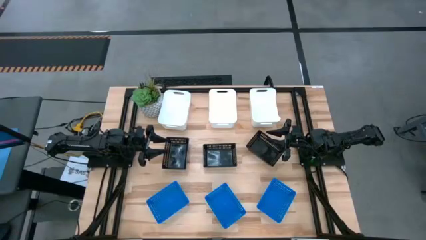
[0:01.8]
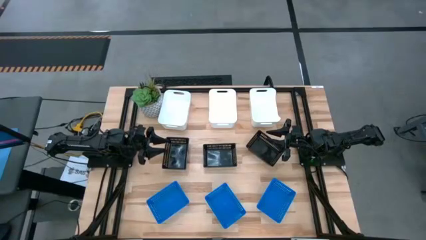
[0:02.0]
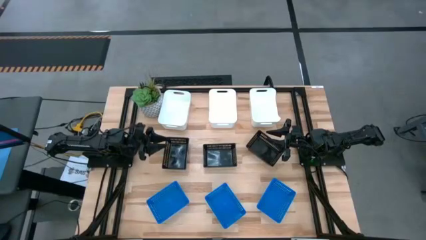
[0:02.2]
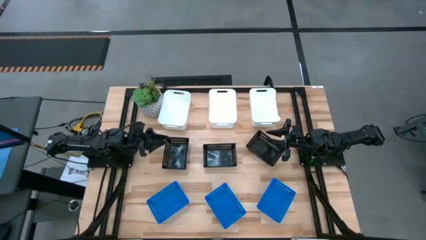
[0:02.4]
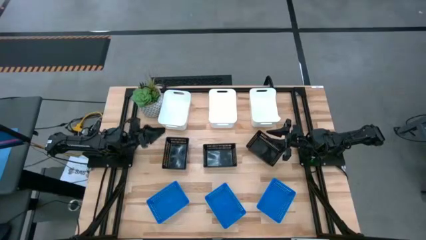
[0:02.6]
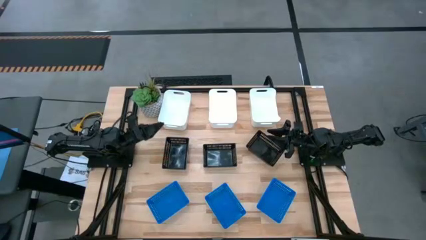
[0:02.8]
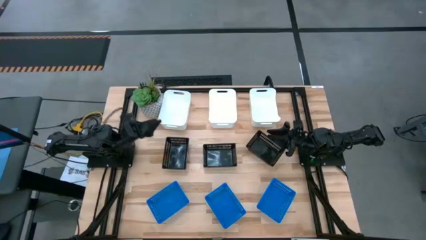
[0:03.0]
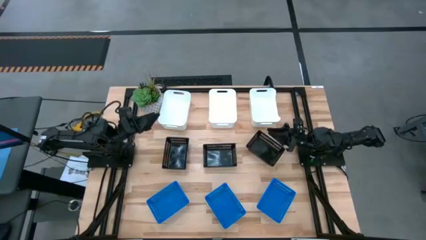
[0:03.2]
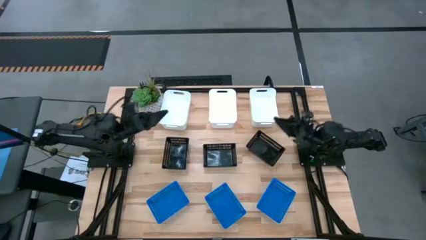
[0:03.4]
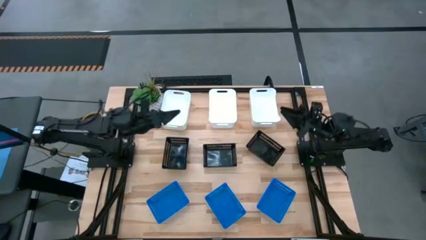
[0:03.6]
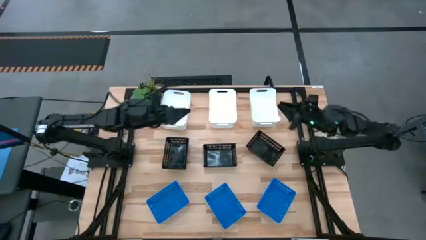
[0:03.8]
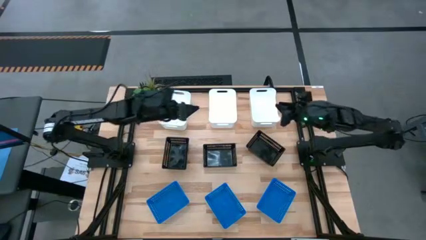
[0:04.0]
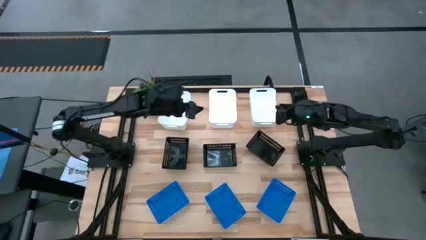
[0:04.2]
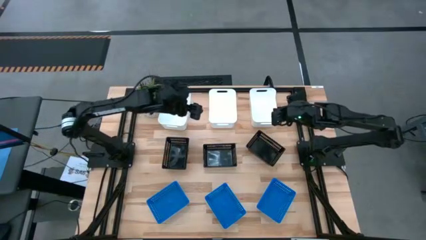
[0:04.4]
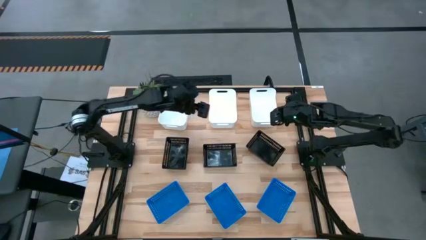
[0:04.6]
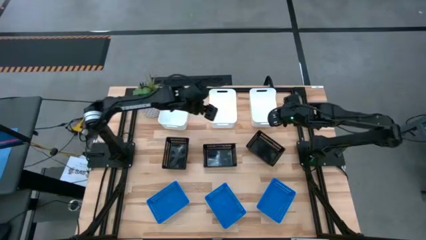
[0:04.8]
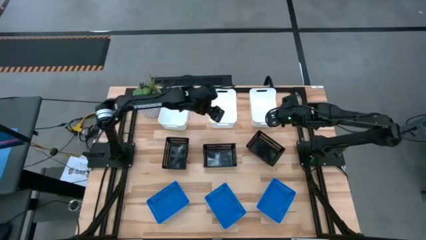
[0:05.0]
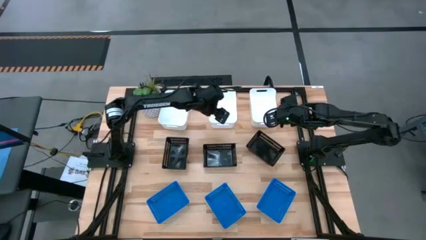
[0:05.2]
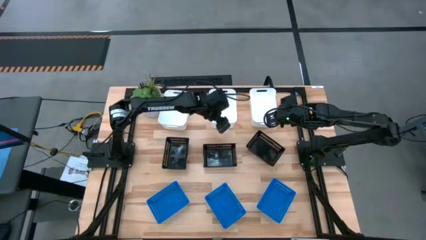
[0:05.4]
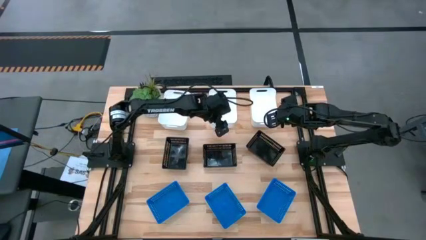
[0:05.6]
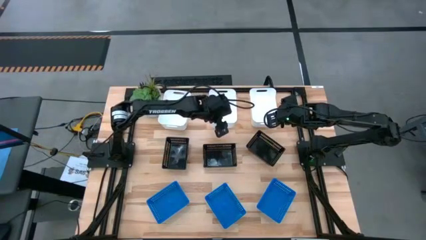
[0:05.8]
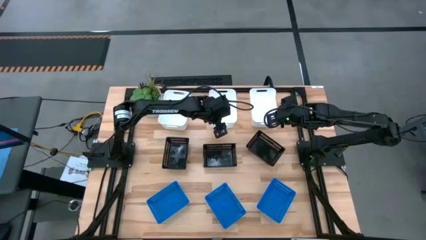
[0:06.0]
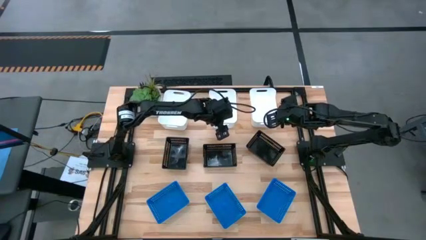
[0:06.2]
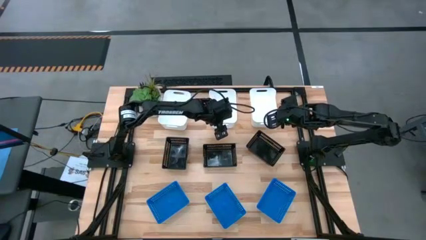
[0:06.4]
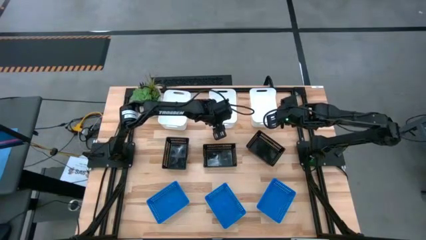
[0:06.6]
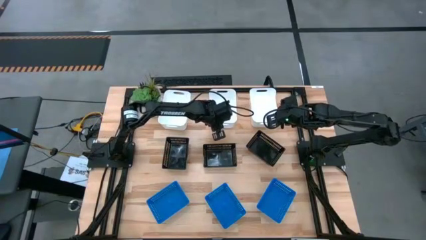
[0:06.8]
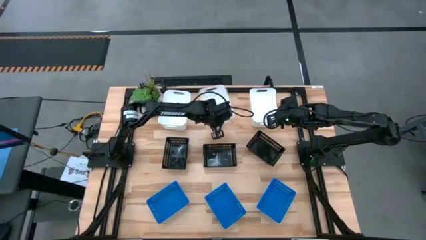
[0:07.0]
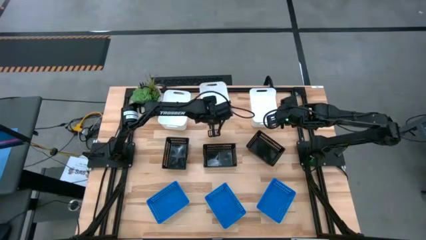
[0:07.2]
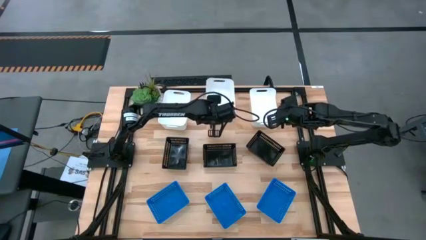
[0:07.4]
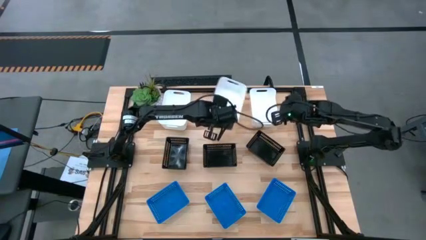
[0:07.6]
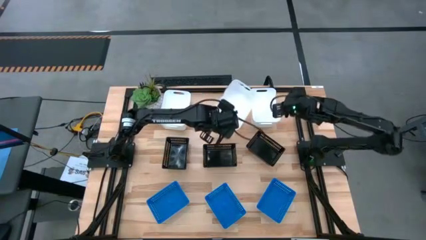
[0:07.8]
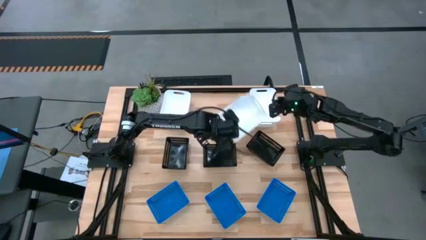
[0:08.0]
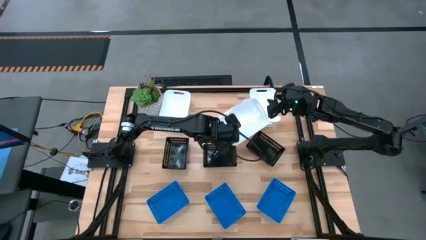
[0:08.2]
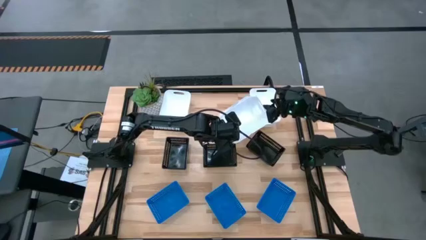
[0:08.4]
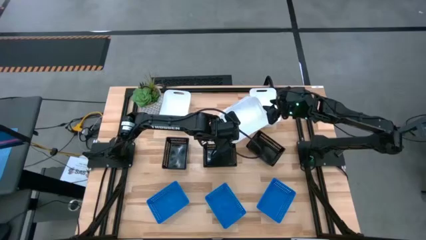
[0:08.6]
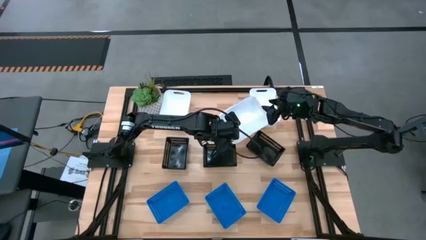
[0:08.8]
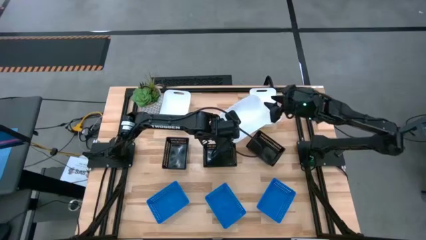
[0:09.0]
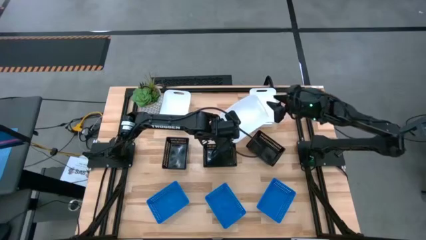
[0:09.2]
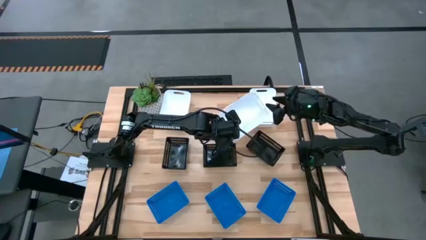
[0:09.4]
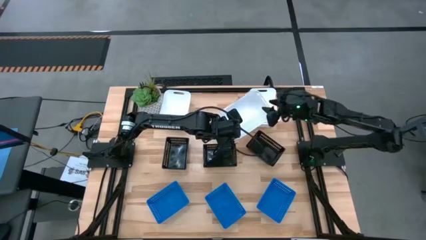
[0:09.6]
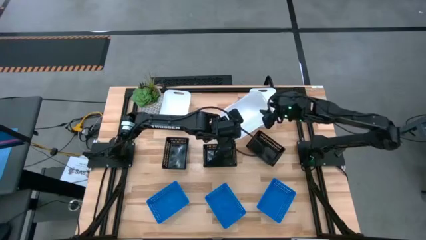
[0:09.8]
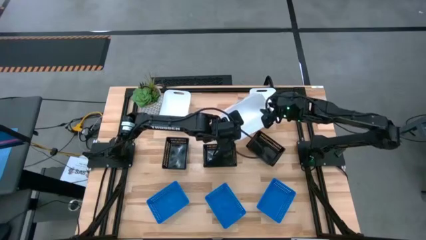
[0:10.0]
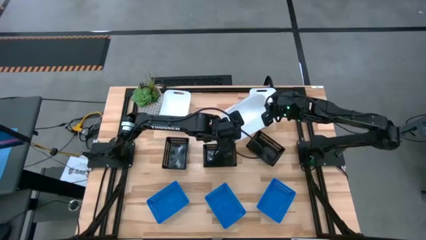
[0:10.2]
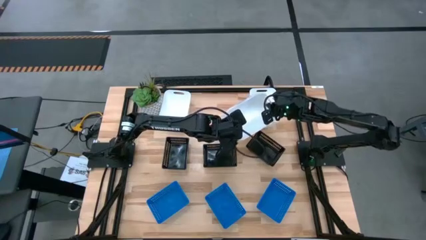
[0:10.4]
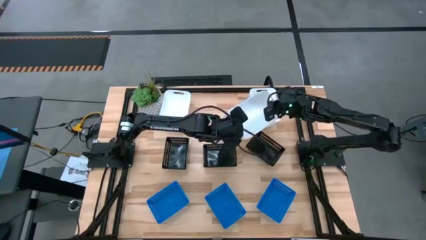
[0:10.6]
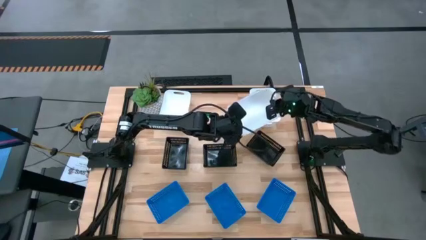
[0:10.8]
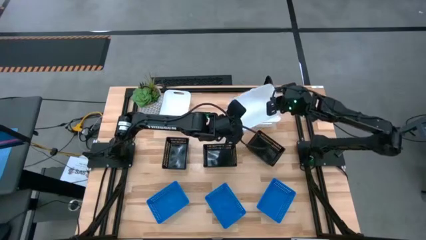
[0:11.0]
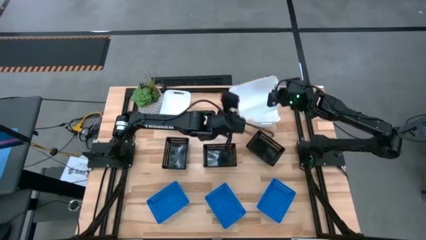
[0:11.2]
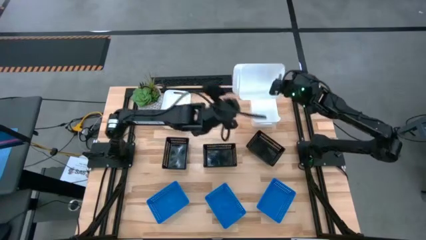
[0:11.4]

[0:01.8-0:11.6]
Stack the middle white bin on the left white bin

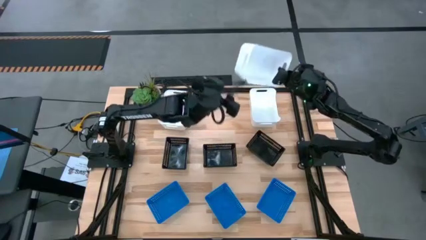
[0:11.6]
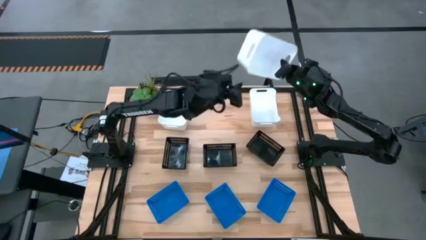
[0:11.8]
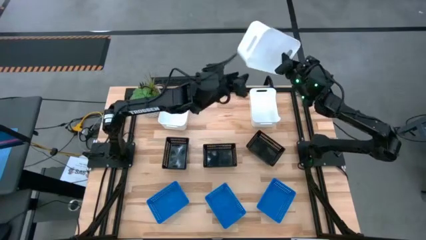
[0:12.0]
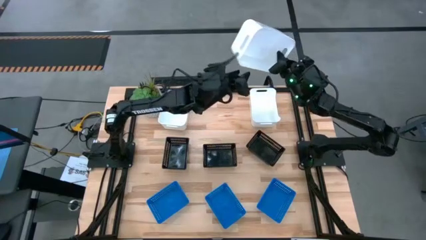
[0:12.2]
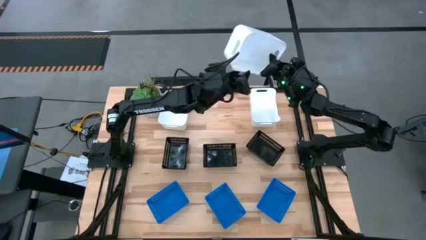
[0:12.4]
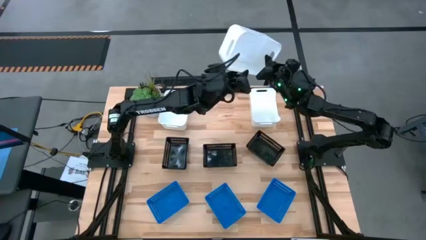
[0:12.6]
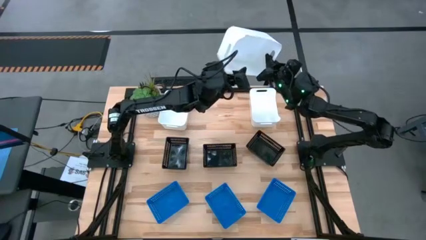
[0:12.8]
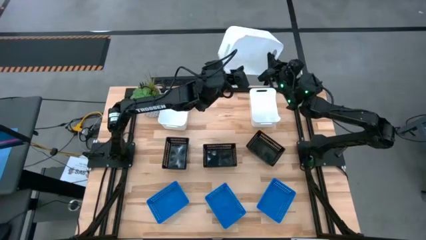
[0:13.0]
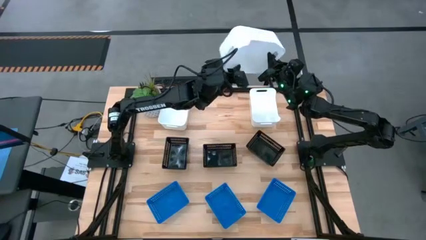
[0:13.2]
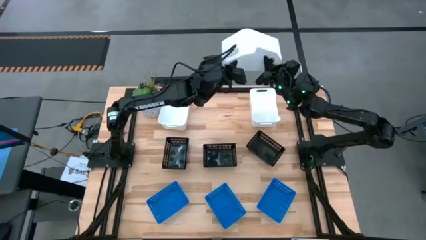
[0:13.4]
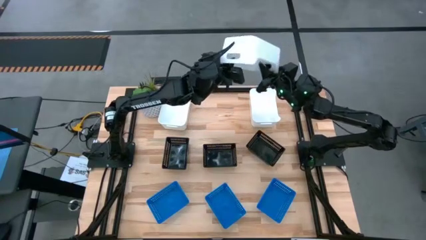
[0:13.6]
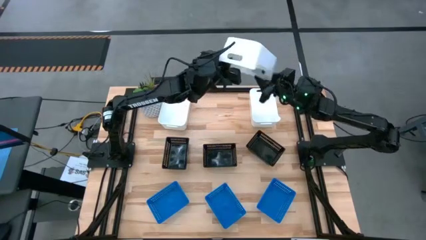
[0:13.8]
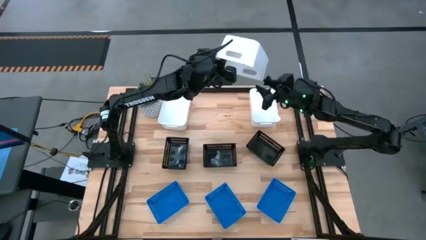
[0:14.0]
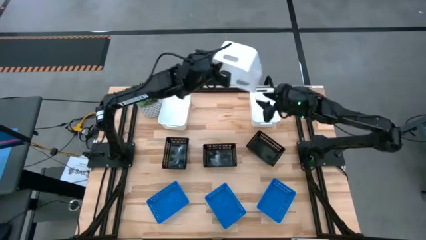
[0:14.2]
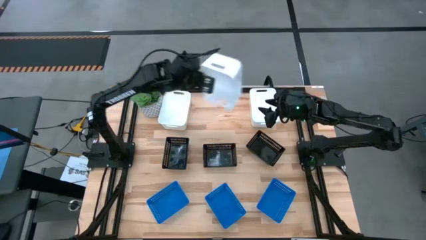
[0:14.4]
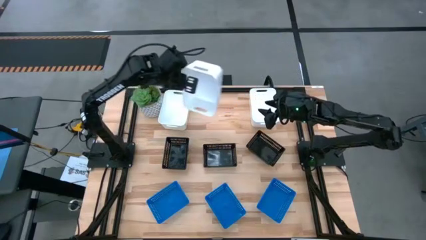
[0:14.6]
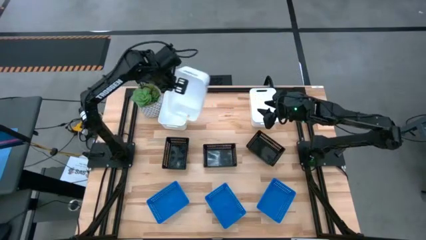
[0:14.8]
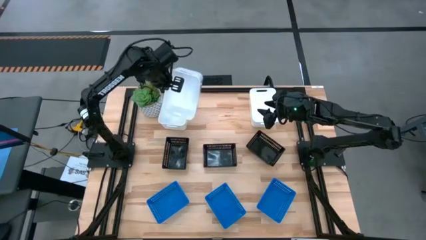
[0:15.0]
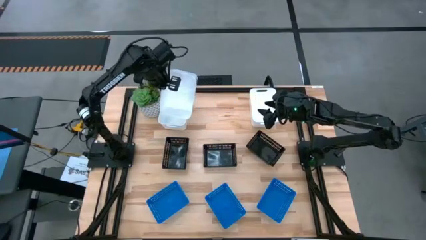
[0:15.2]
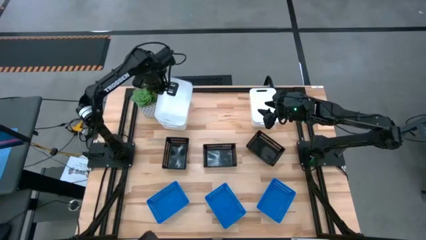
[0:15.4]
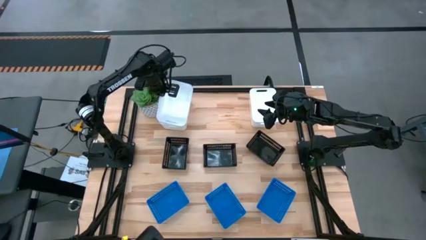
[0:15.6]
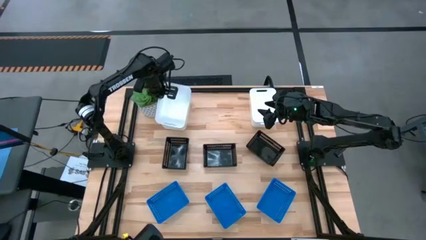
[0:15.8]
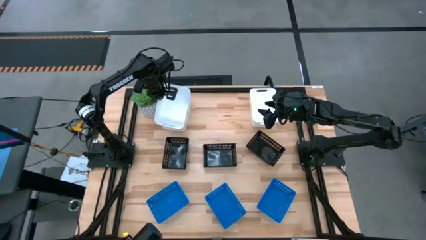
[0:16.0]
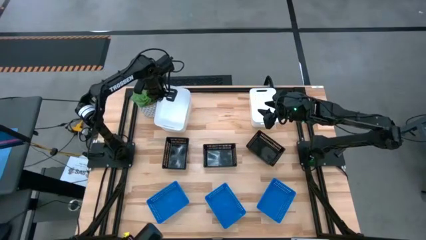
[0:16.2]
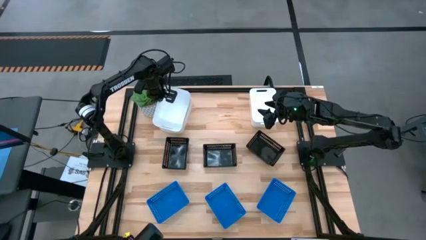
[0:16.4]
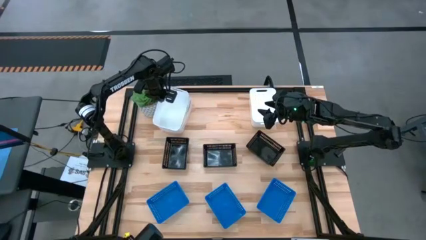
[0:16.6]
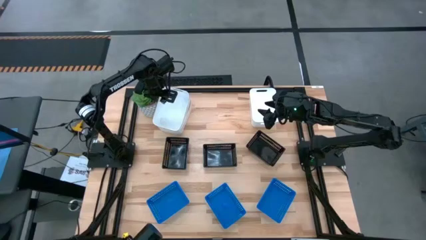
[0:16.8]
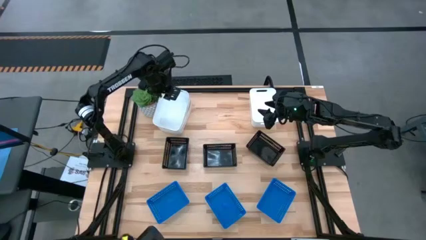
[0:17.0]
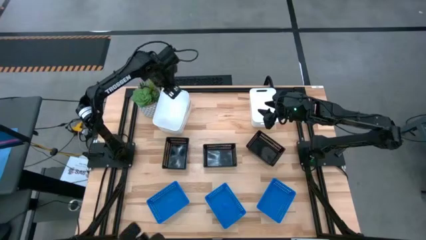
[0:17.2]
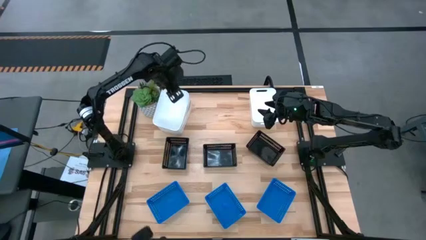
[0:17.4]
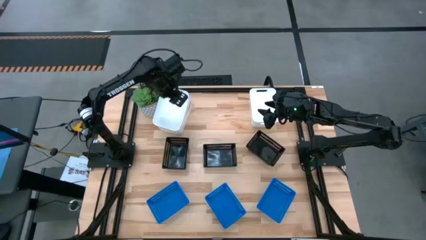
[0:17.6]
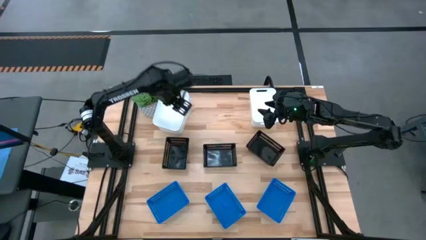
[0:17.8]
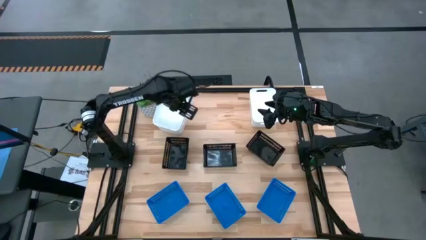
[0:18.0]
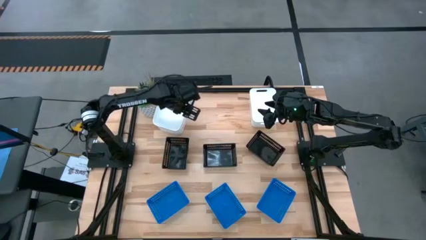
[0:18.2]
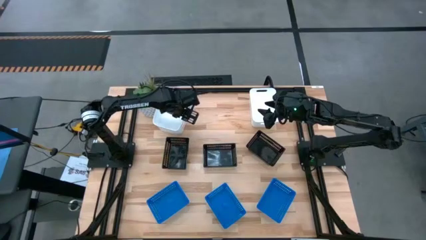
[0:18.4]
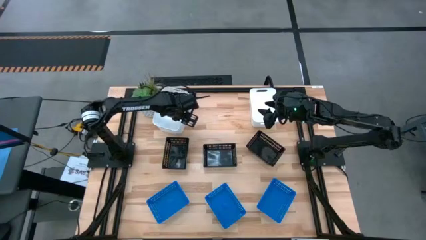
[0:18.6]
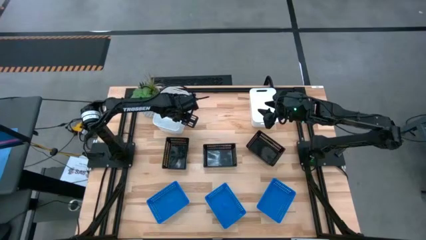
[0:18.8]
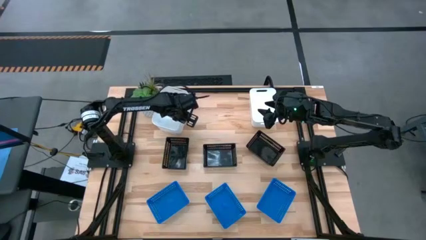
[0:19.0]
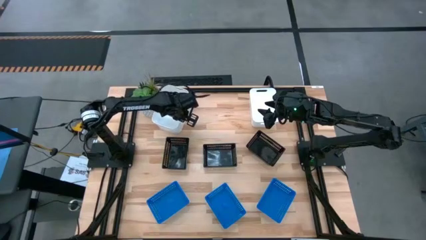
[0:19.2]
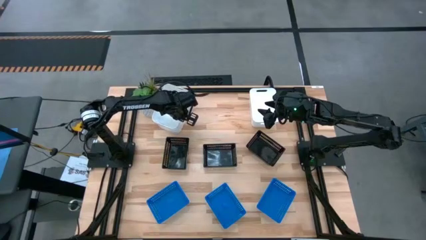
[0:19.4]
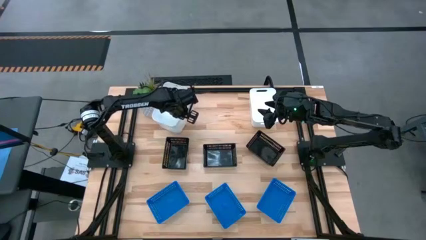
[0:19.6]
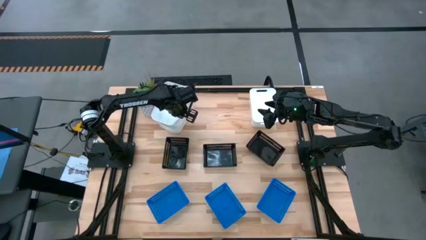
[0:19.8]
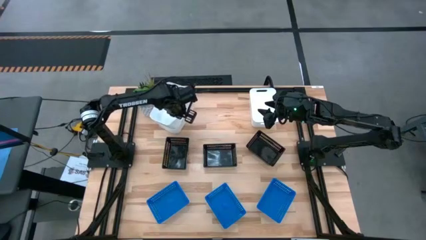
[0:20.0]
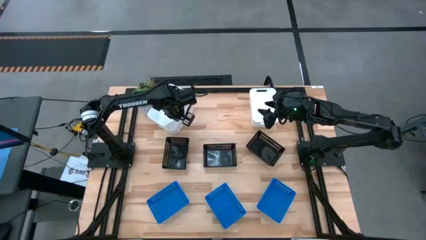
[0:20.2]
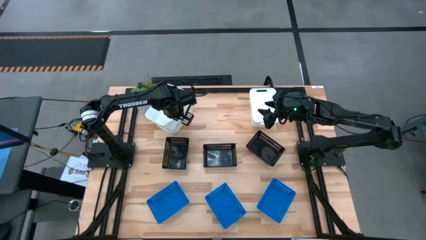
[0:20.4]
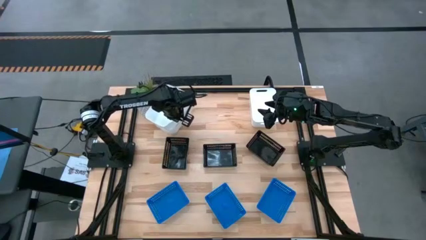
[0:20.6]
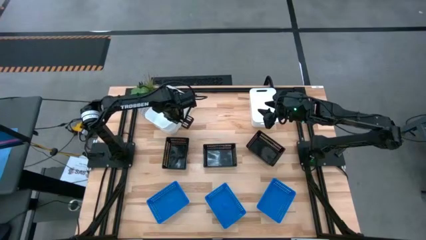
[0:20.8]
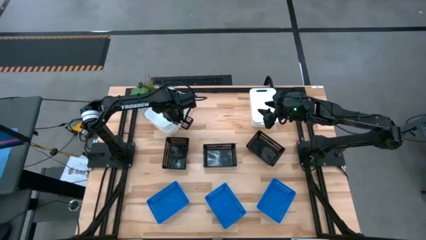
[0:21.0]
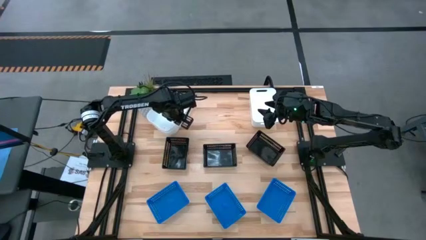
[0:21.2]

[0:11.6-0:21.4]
Stack the middle white bin on the left white bin
